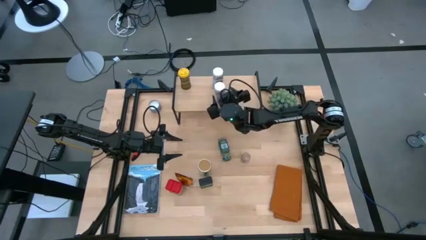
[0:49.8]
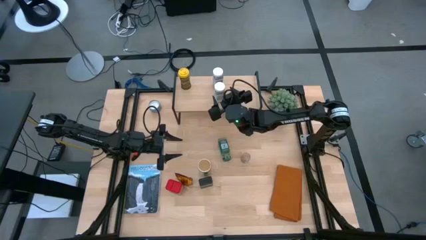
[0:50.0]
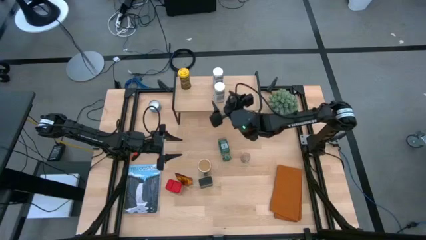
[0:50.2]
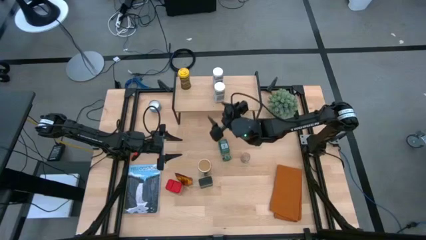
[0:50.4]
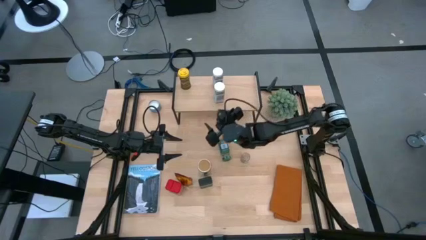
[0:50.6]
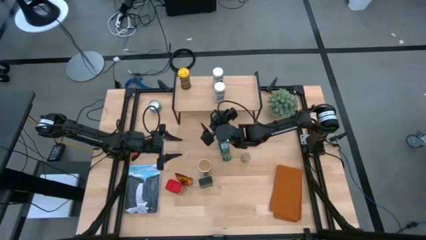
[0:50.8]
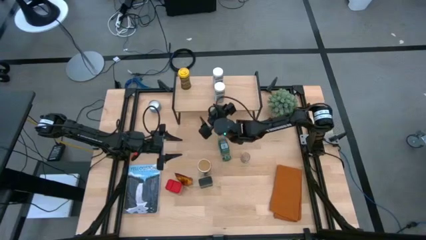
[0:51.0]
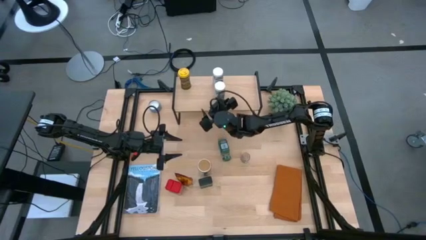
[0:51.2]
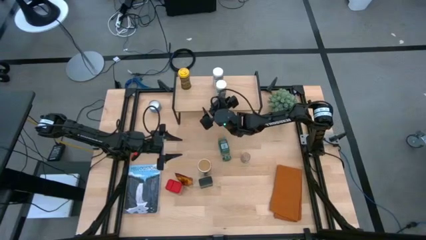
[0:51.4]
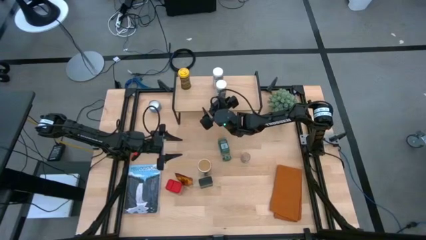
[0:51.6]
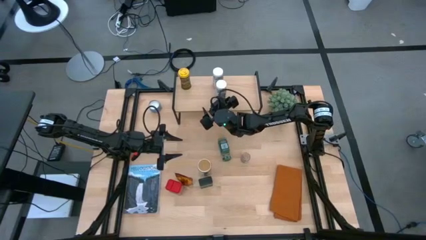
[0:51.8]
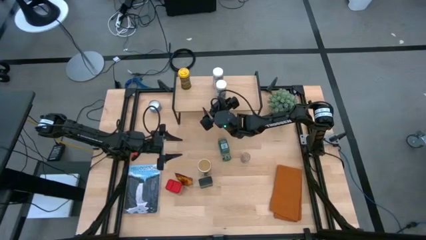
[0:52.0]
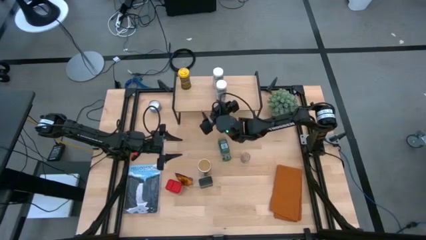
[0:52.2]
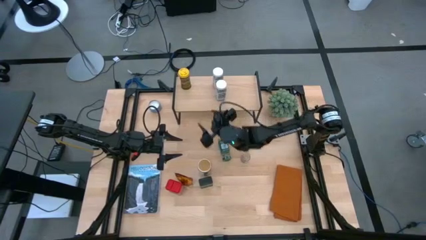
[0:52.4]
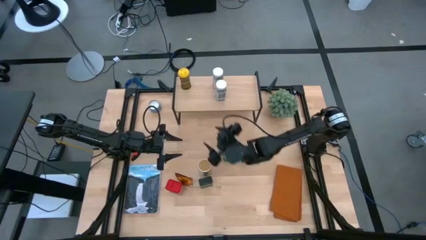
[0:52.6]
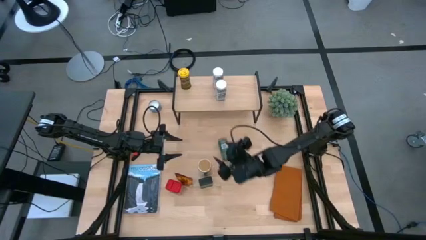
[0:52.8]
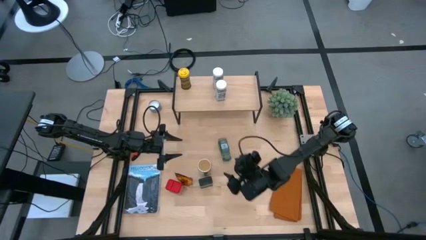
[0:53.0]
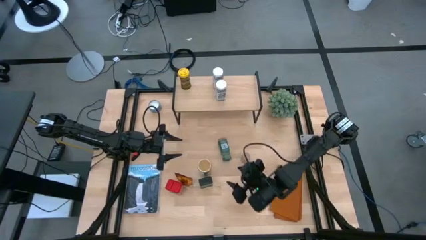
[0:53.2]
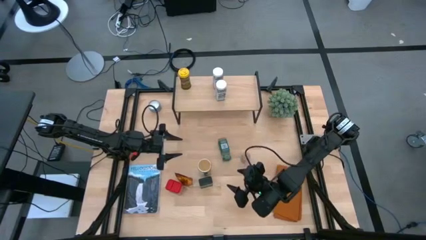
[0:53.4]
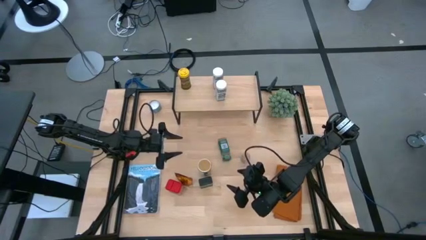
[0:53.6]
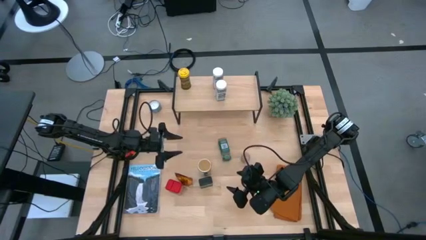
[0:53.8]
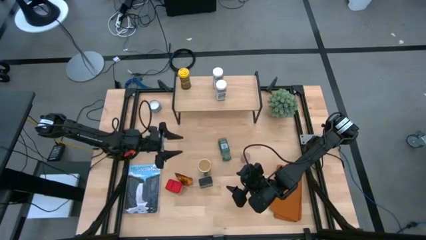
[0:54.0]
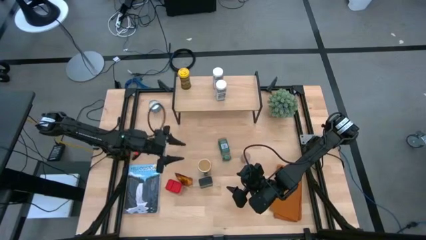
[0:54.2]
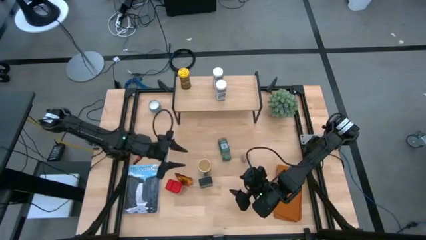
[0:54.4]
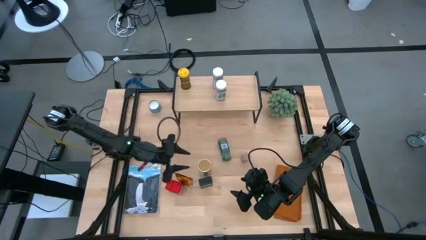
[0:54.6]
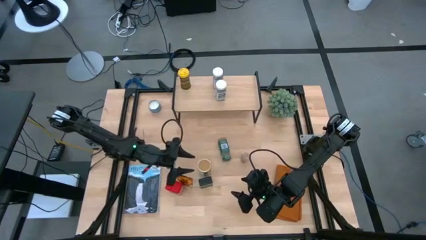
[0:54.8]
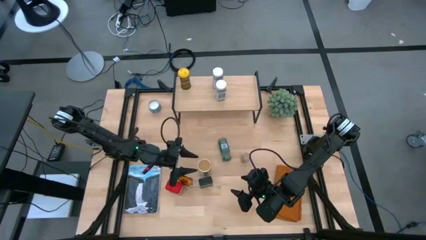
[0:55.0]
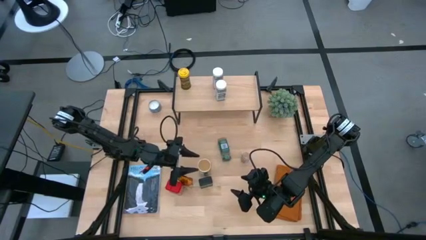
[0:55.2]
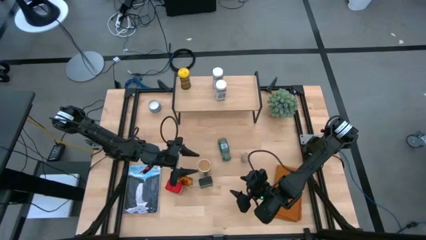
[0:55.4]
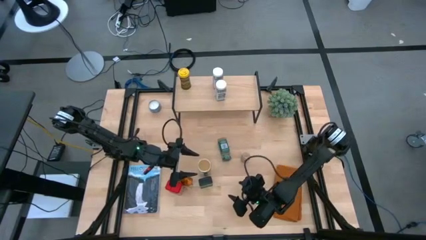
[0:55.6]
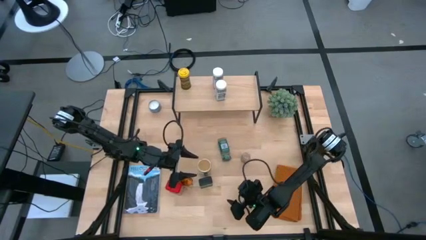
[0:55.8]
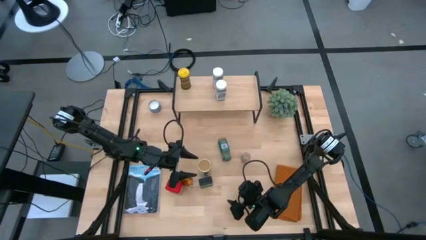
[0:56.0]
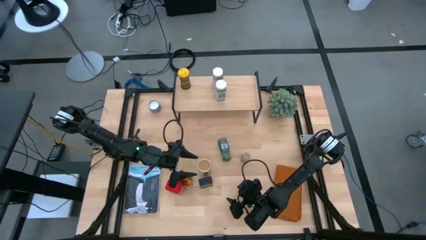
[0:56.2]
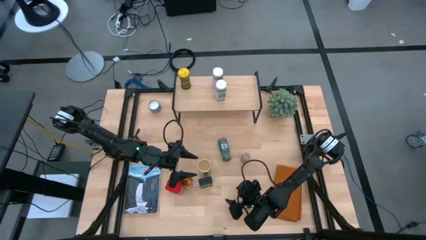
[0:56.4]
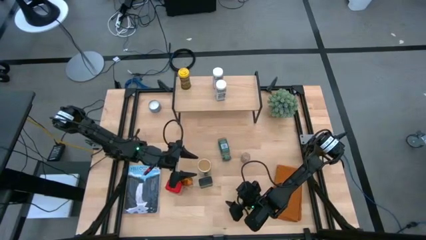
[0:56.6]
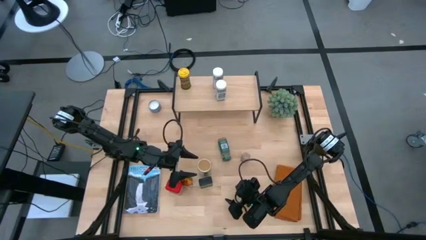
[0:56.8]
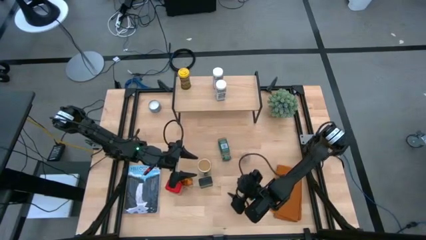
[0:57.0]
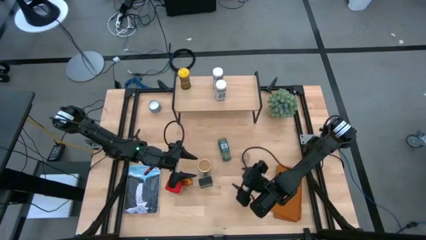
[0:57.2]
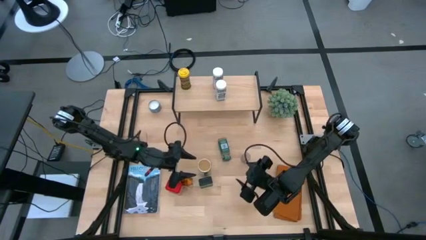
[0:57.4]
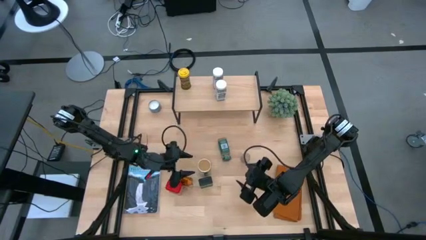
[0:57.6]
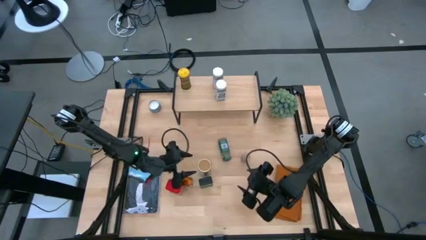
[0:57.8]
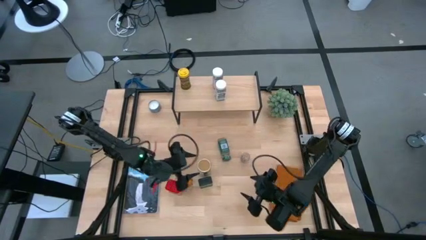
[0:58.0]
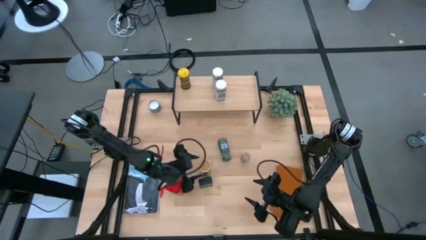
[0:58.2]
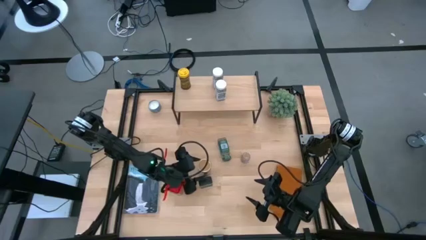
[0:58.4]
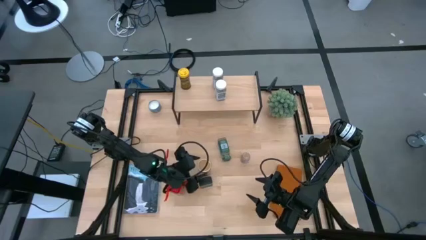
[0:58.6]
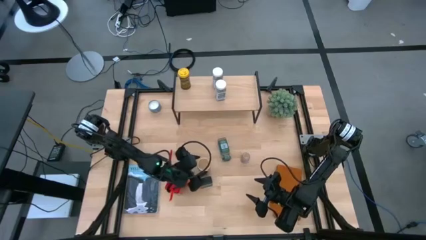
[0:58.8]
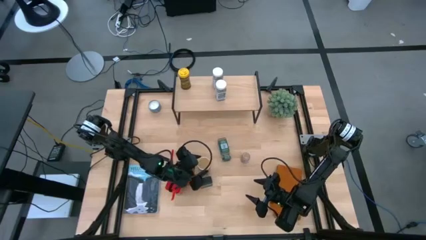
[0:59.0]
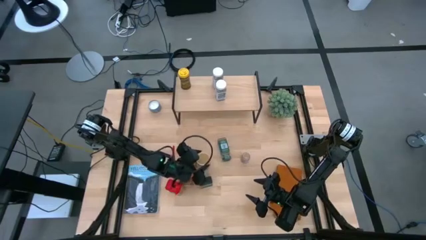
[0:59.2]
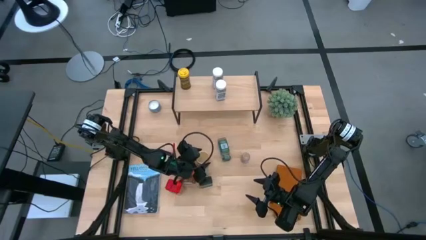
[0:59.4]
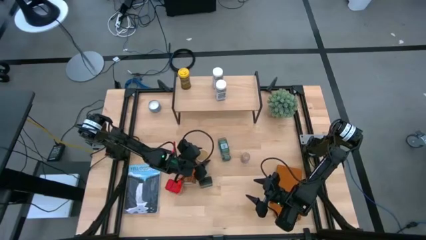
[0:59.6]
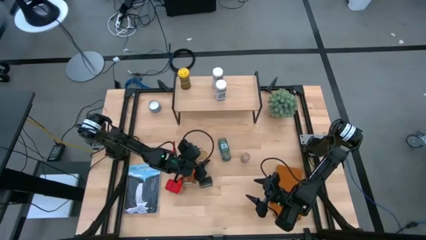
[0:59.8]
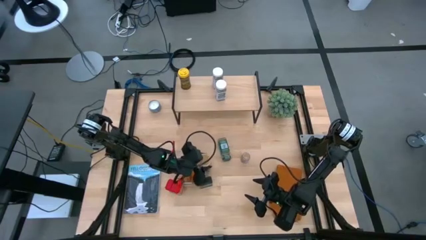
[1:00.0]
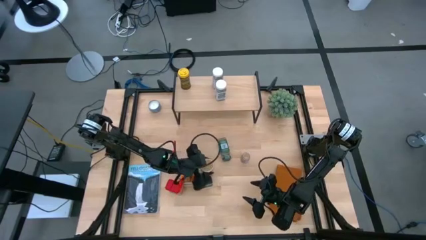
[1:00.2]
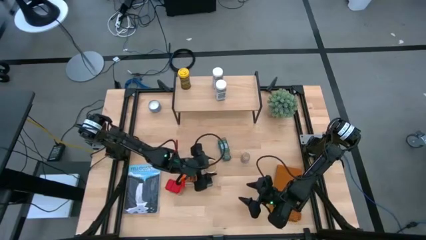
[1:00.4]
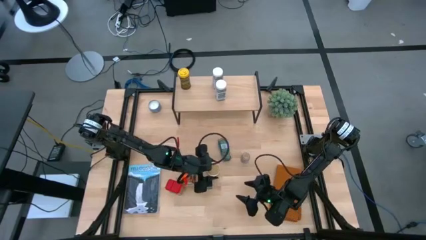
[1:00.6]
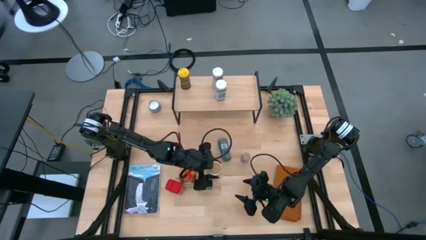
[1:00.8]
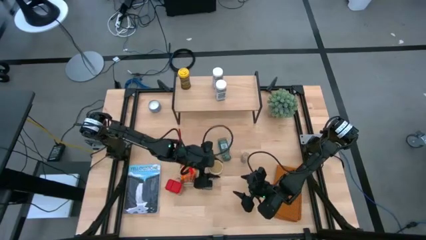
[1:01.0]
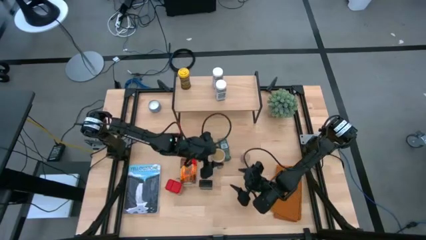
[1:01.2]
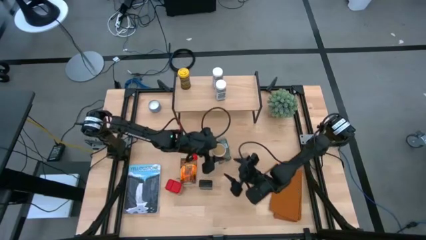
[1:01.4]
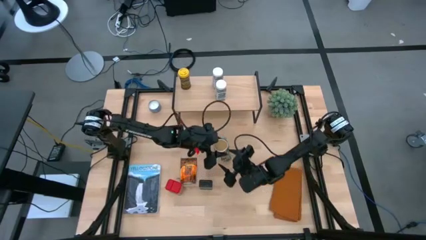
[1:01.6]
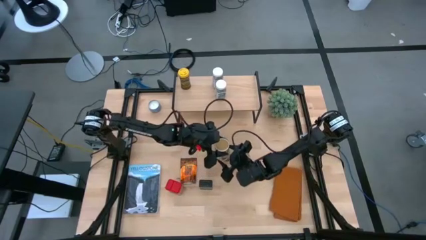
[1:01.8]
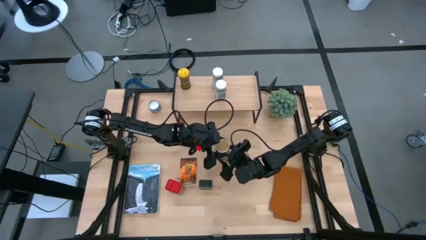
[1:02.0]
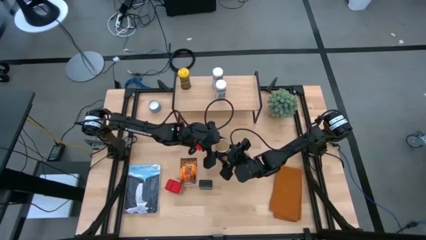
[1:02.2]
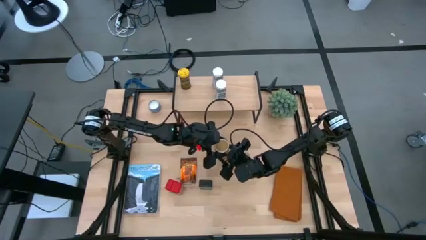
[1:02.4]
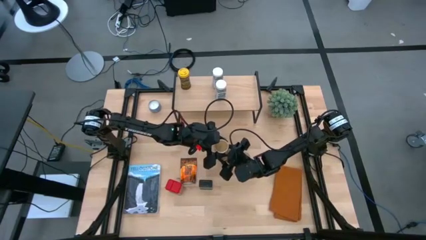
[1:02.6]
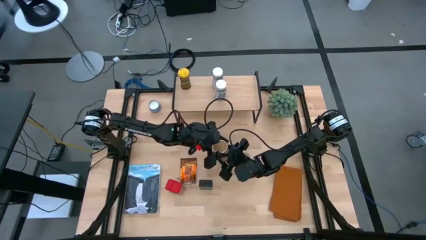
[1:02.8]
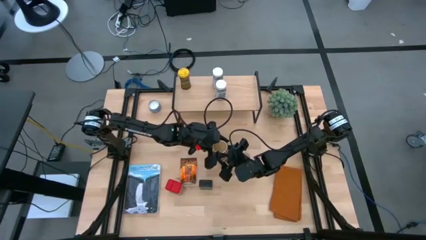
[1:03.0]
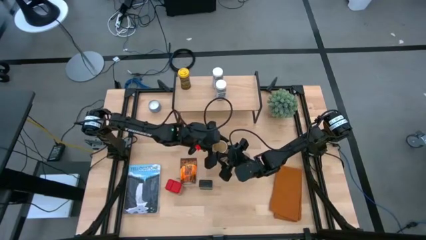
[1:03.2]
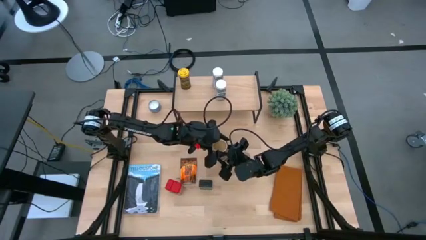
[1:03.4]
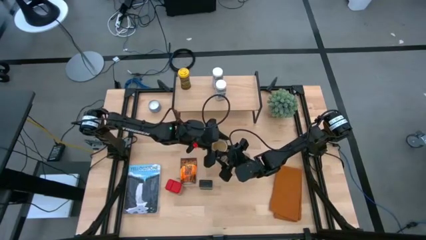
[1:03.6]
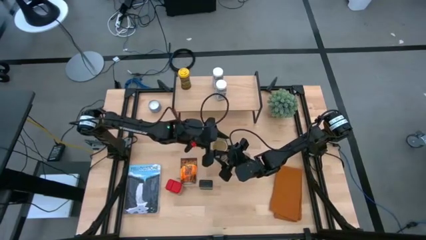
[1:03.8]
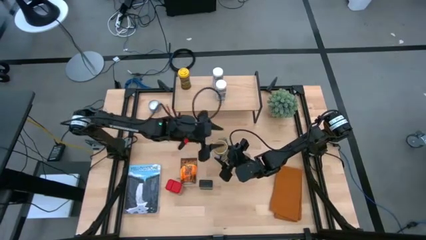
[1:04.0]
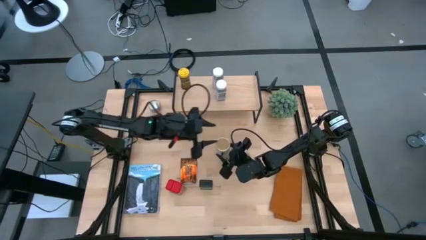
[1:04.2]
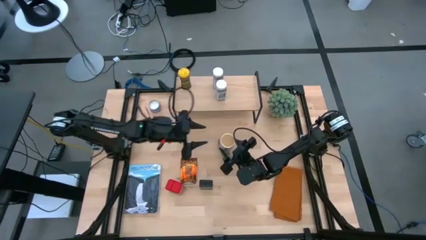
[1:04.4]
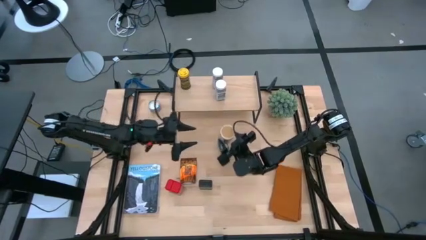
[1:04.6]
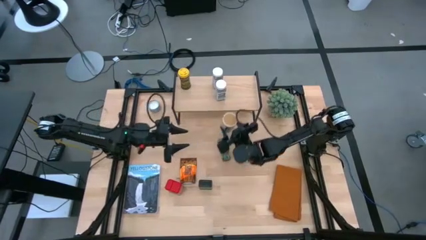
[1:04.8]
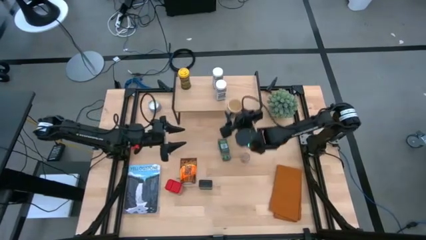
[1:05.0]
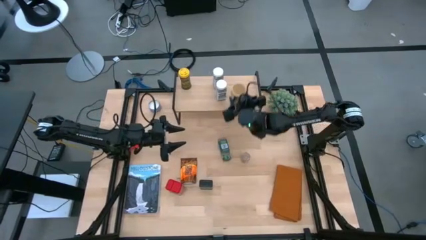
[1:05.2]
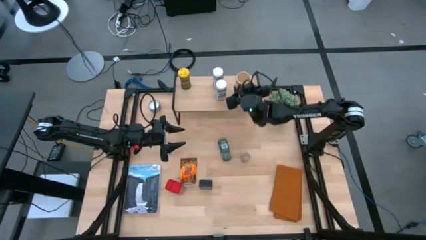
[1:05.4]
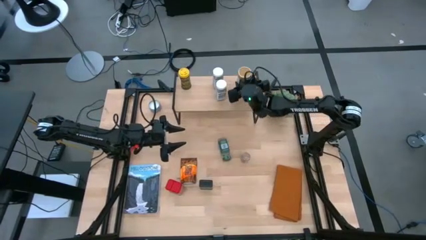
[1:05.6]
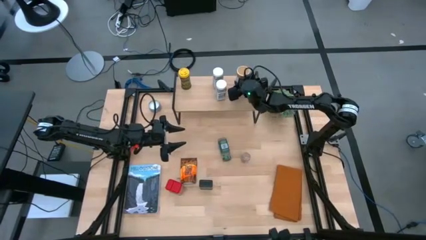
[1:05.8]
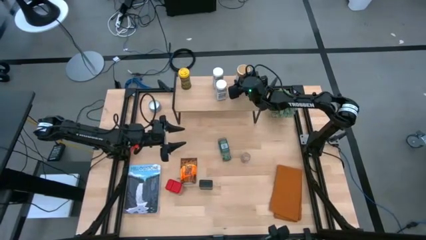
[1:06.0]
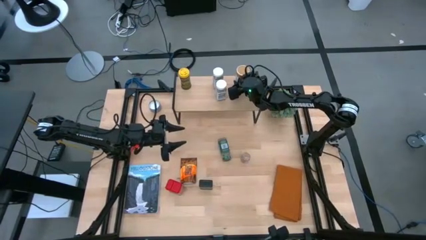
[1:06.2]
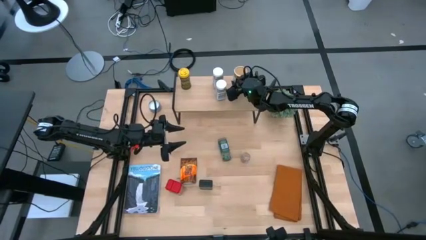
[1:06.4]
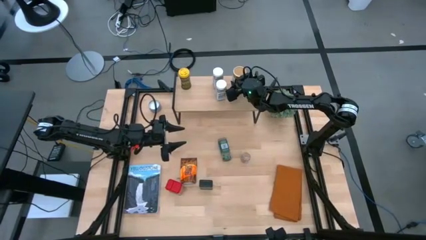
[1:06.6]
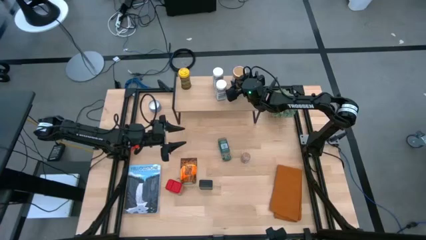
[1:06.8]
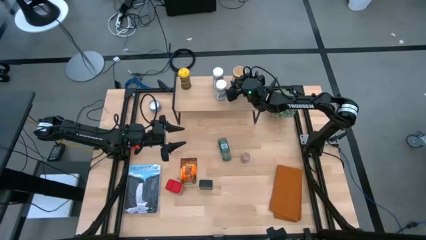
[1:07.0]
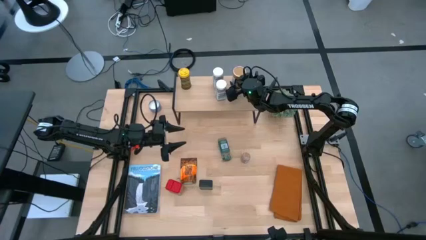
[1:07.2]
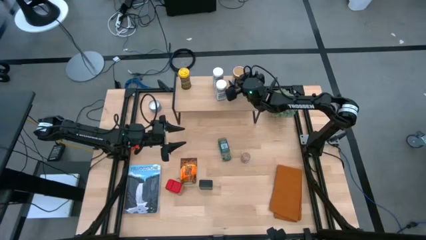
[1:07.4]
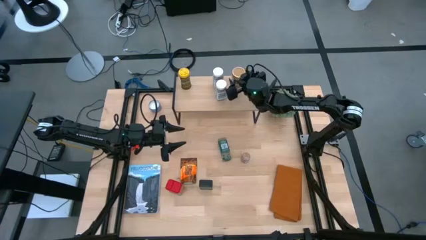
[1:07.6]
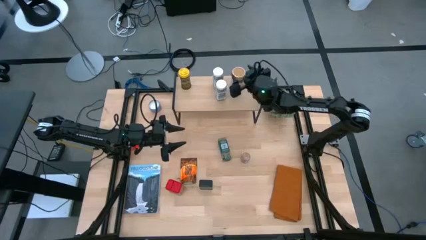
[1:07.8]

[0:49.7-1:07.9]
Task: Shelf spices
Put the gold bottle seasoning on the shelf
